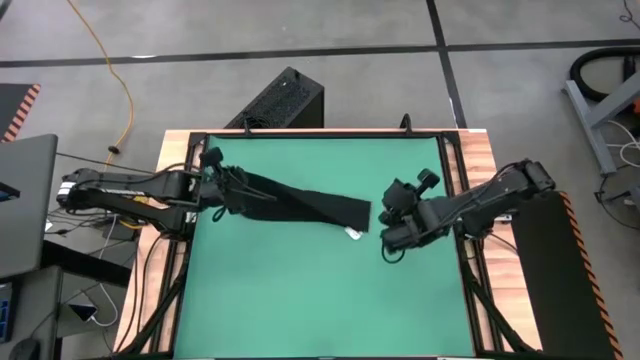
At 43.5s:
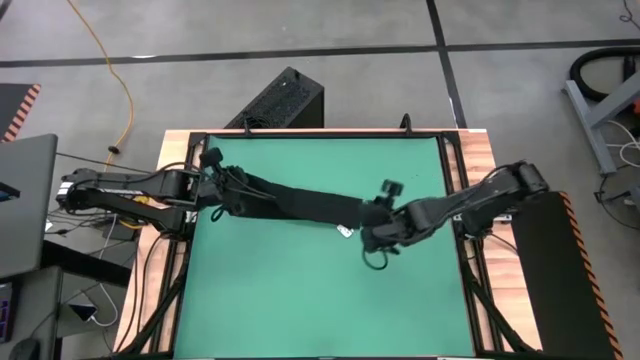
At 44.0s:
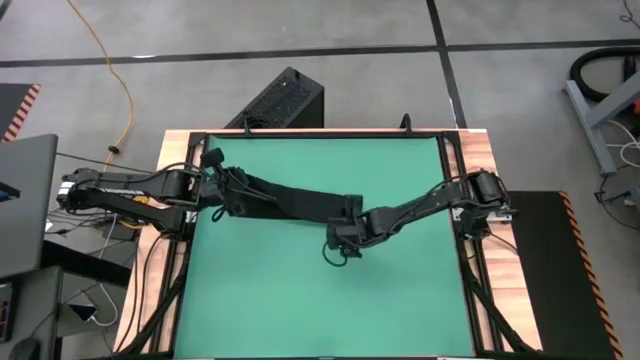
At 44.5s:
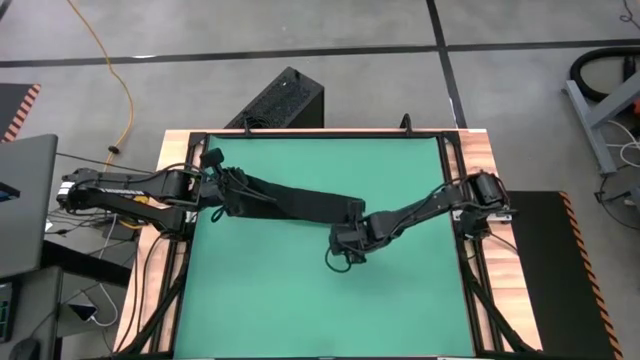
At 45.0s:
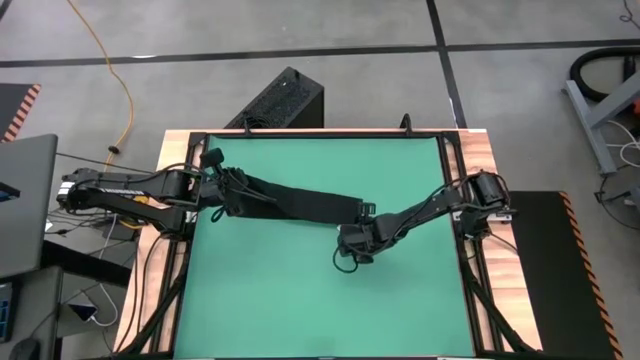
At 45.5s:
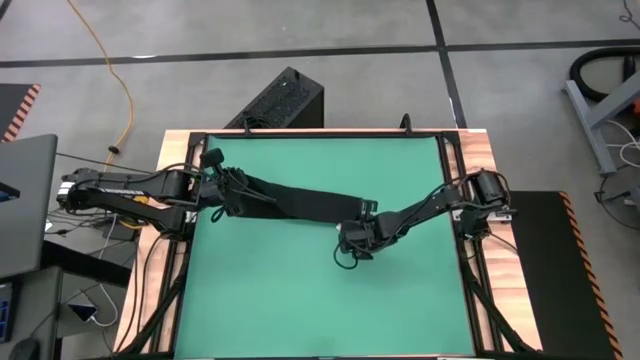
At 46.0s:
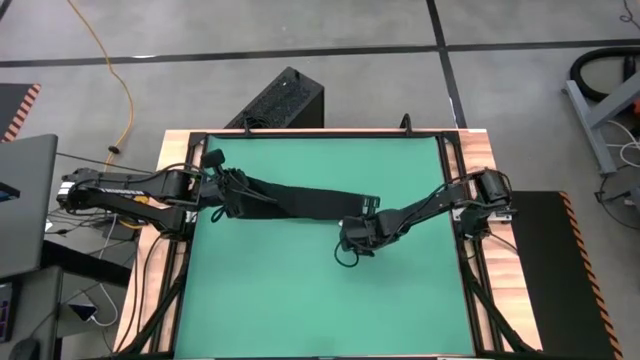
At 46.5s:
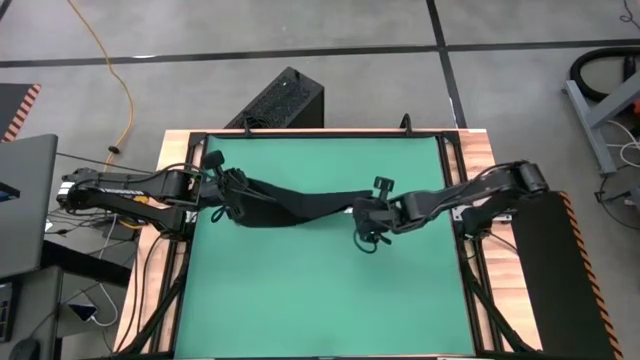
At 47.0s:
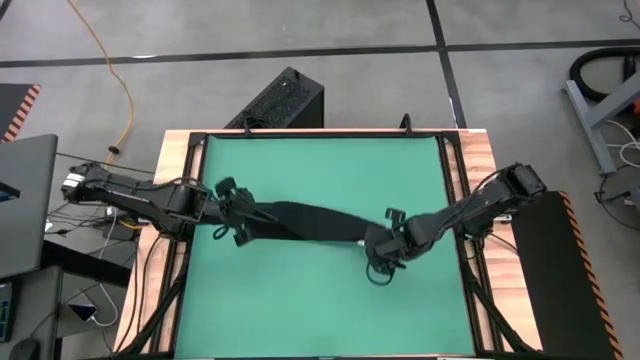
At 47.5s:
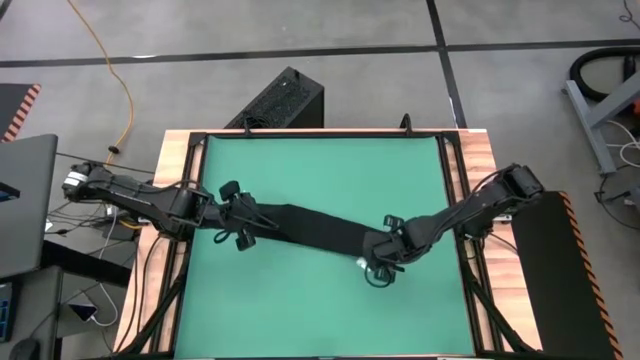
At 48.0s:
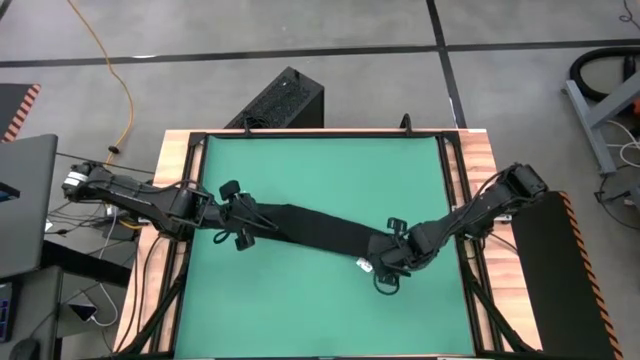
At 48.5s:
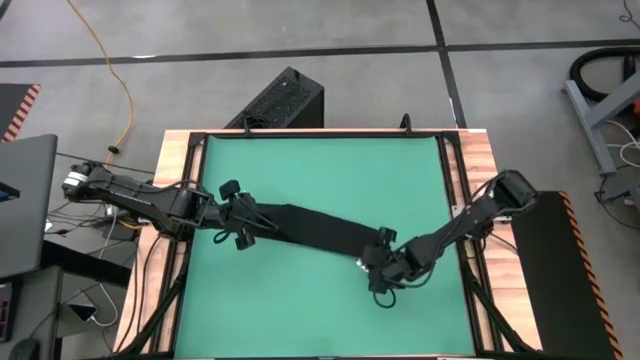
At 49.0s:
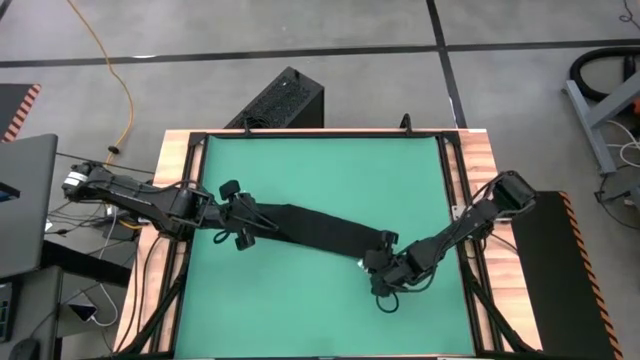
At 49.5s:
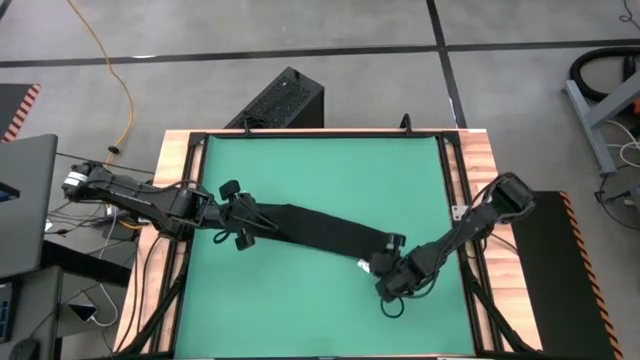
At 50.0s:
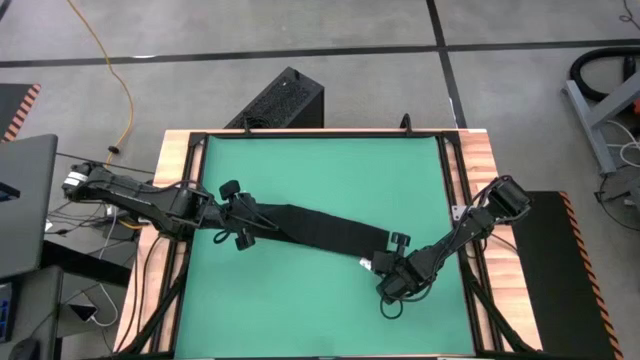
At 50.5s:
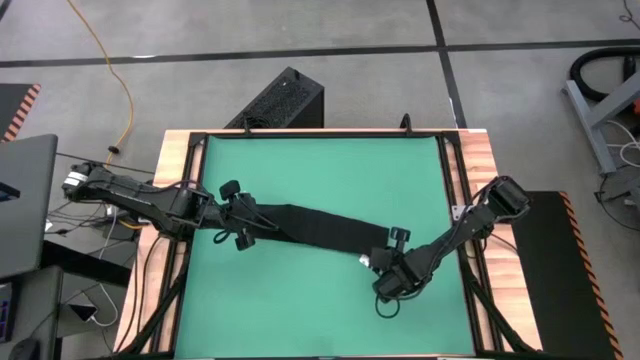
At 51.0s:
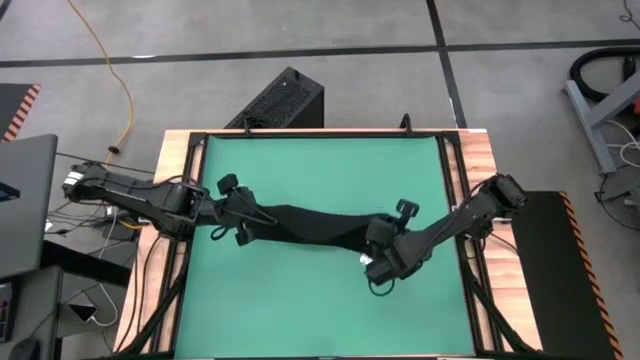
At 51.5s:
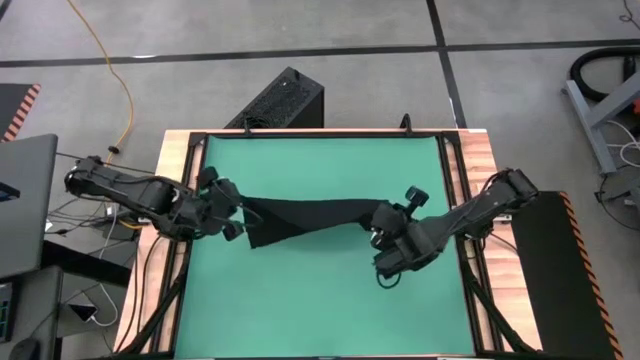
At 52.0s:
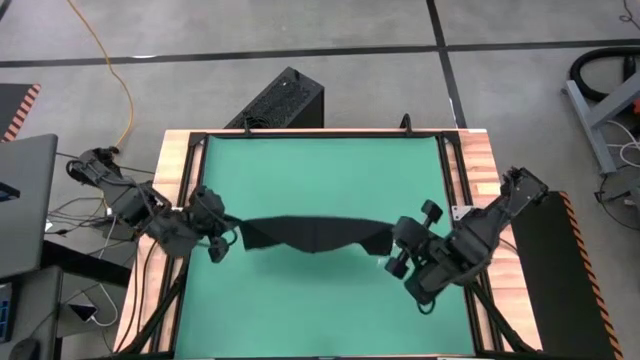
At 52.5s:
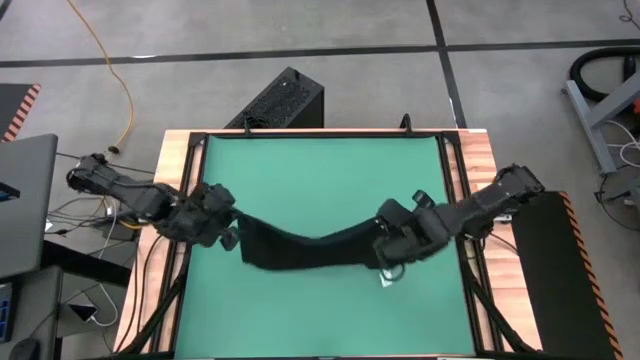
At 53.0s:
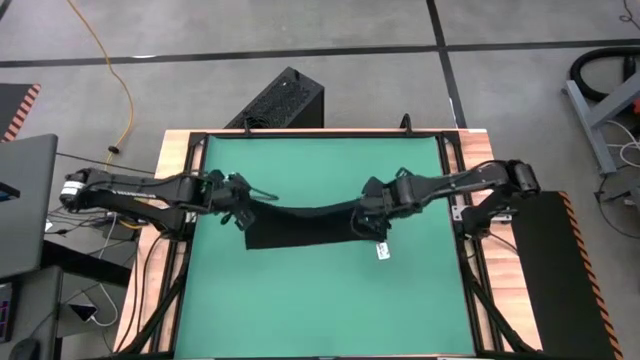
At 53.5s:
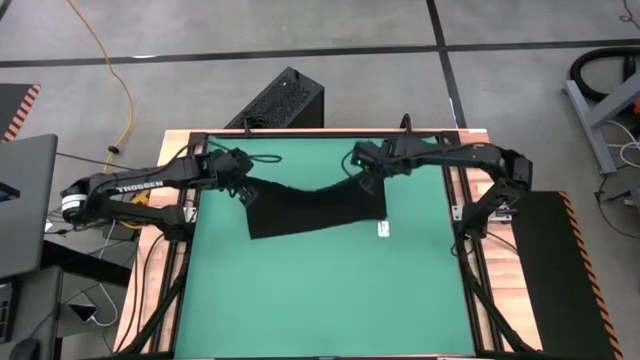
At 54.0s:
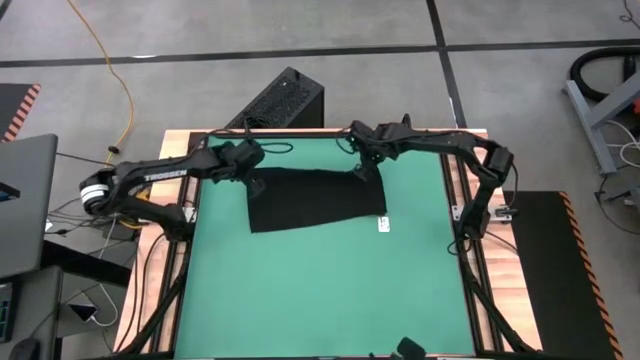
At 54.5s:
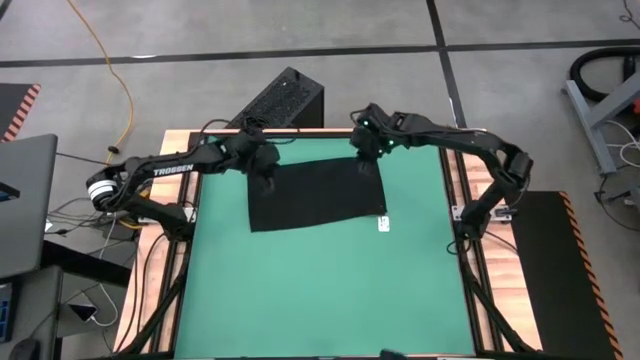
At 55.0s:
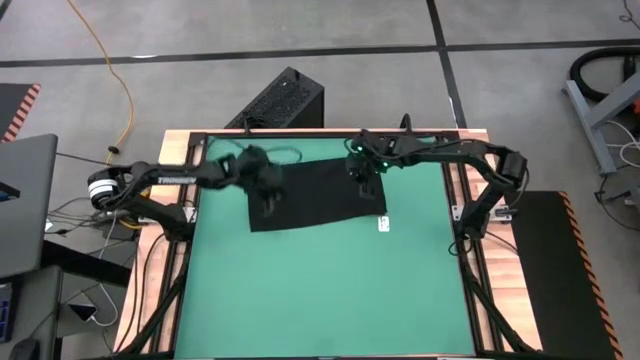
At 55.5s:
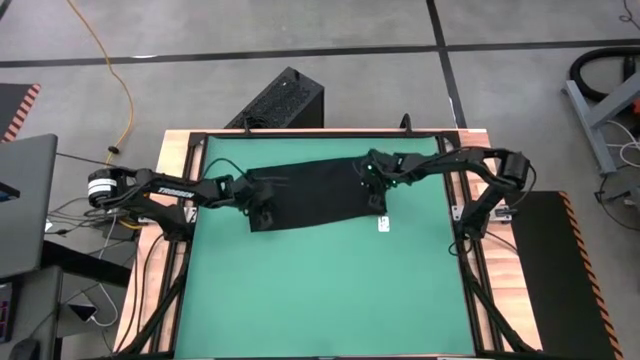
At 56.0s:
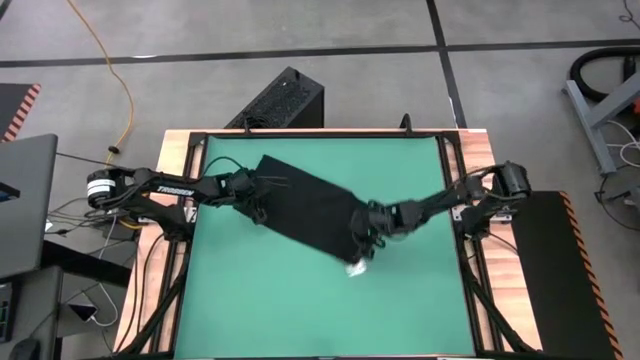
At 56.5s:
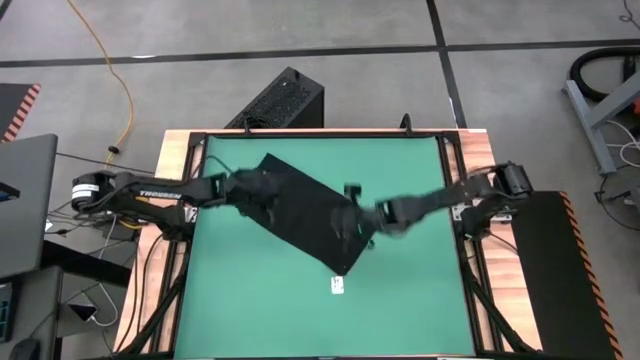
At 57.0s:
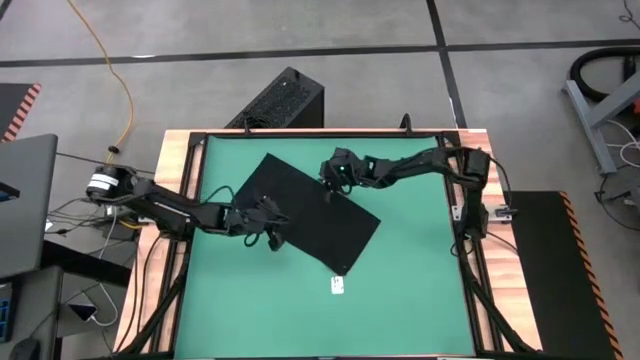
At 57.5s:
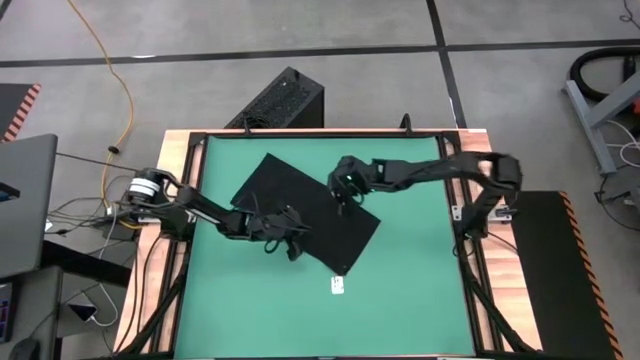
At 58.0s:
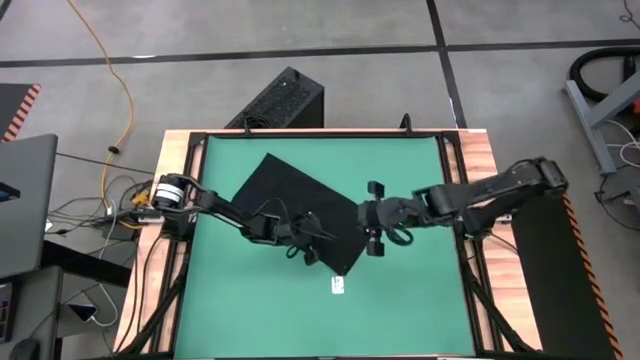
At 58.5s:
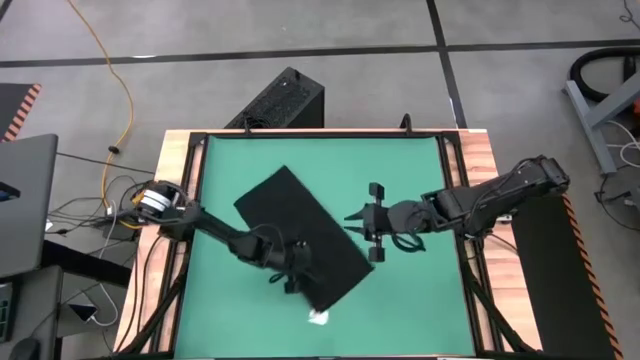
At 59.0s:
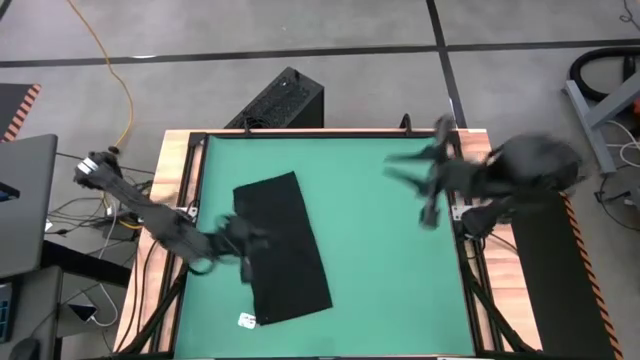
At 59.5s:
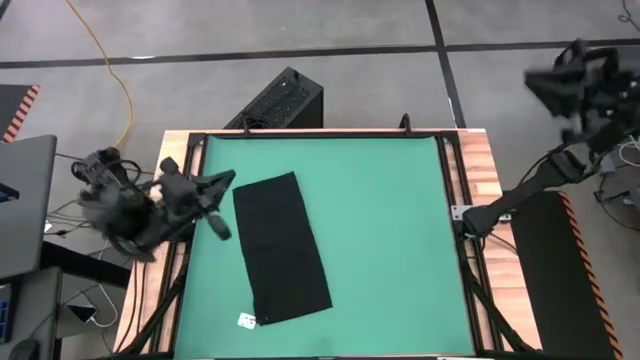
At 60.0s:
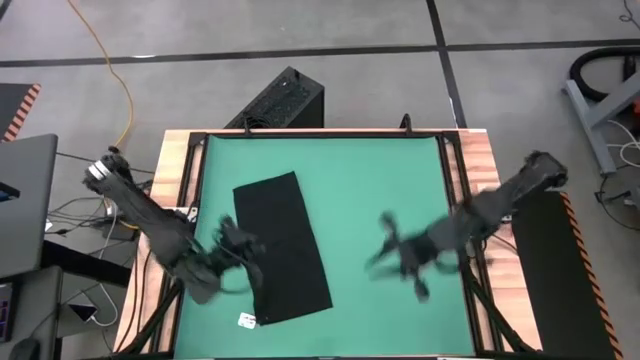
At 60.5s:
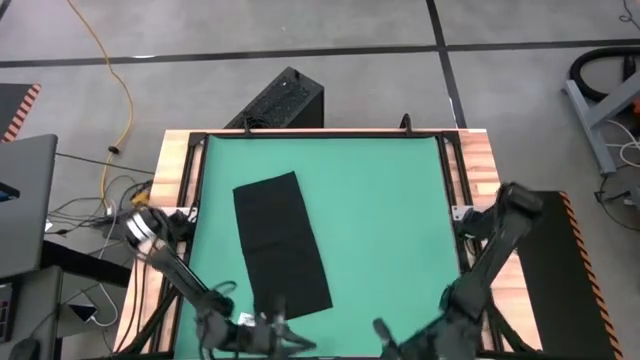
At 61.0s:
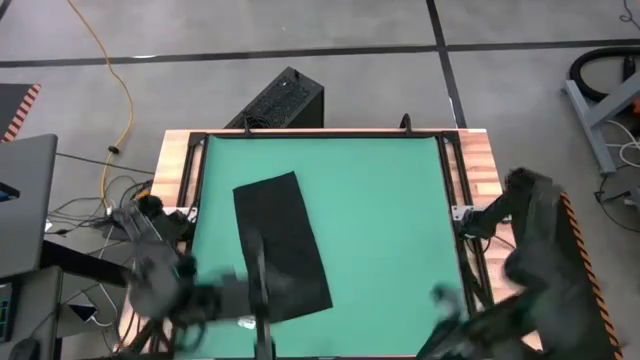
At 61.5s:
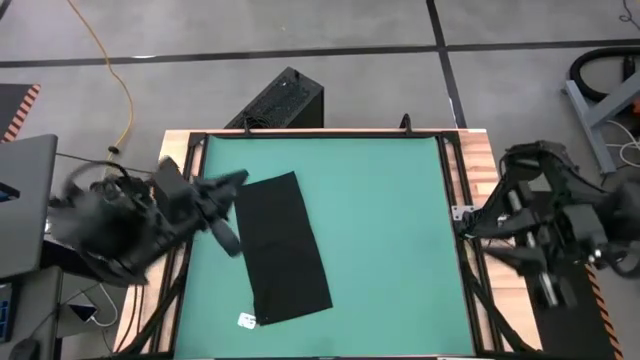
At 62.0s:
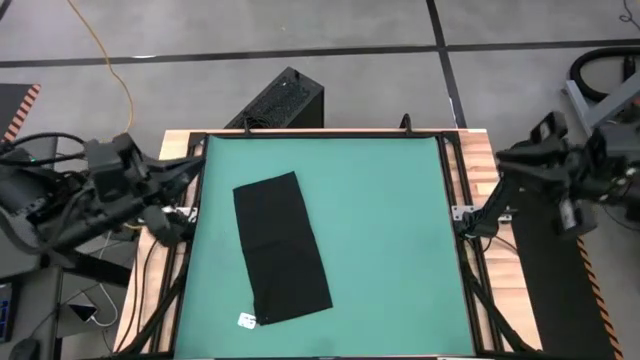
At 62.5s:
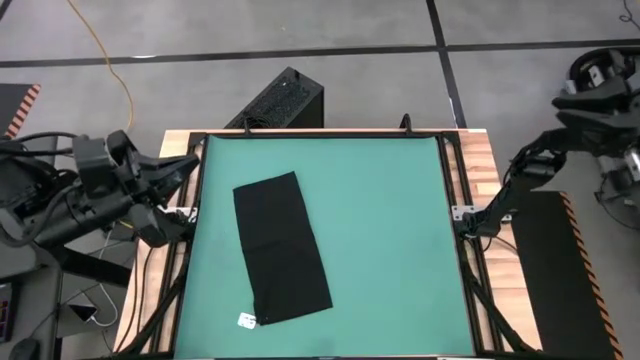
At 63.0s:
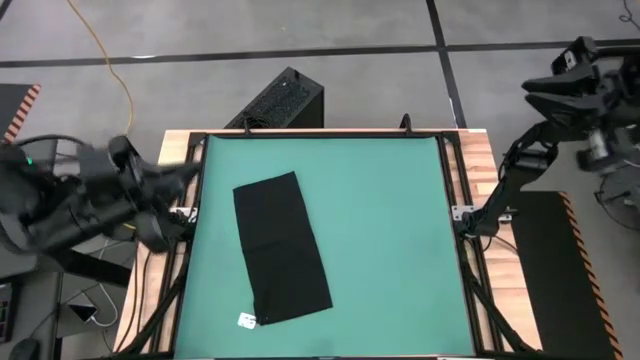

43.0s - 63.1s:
Task: Roll towel
Roll the black towel
